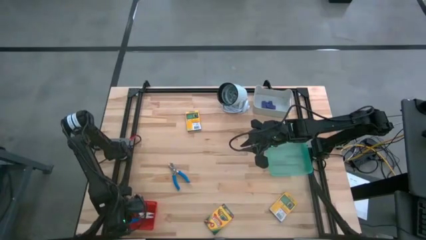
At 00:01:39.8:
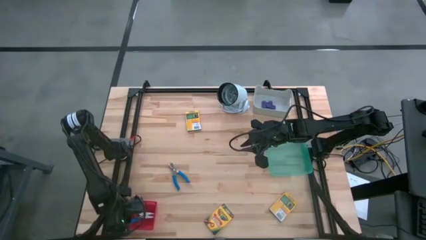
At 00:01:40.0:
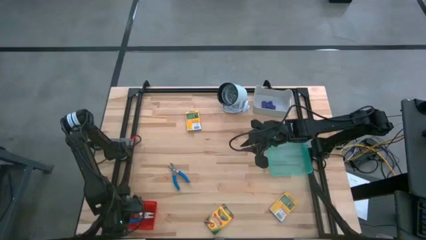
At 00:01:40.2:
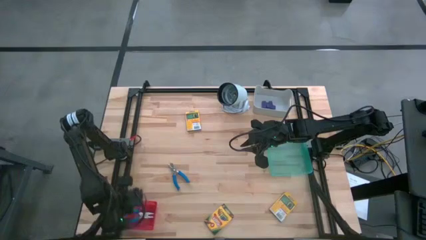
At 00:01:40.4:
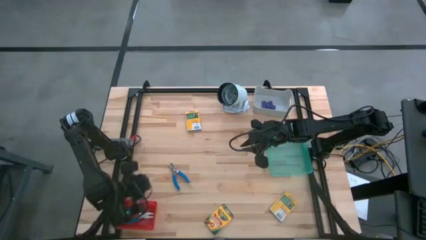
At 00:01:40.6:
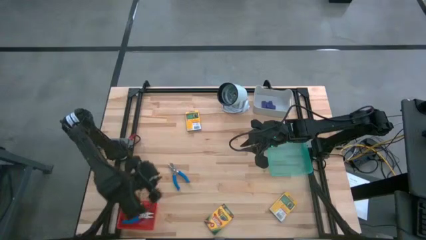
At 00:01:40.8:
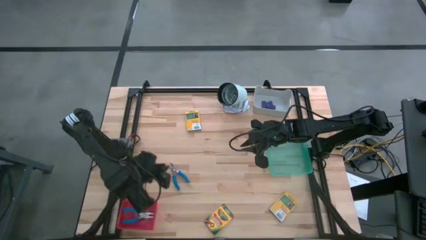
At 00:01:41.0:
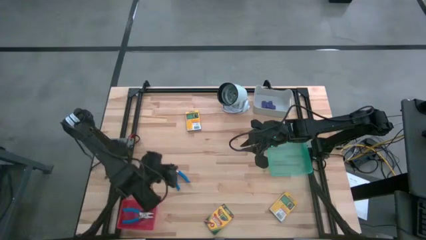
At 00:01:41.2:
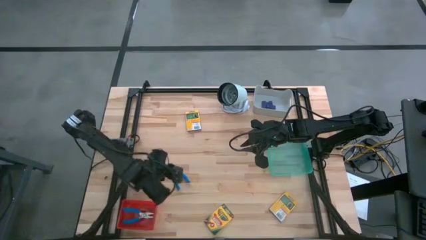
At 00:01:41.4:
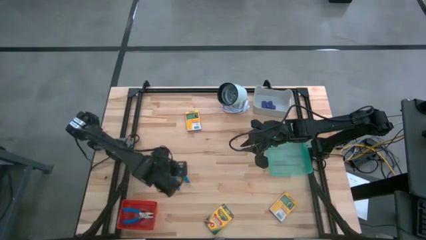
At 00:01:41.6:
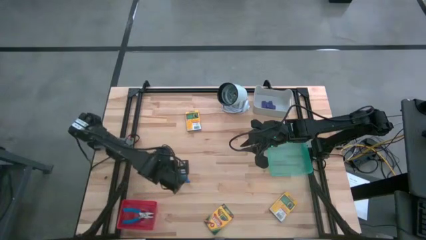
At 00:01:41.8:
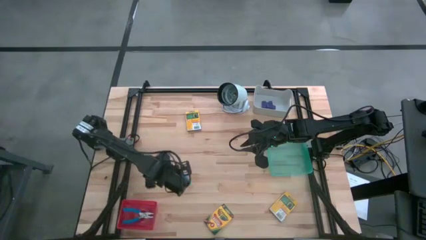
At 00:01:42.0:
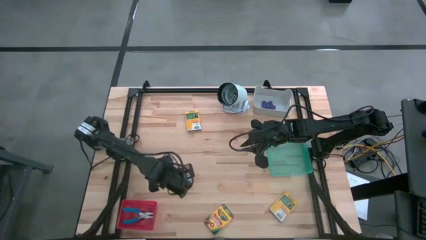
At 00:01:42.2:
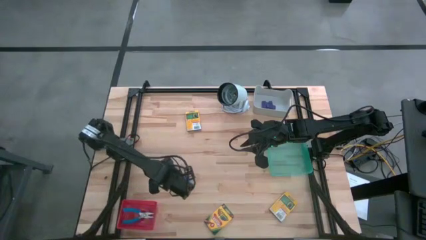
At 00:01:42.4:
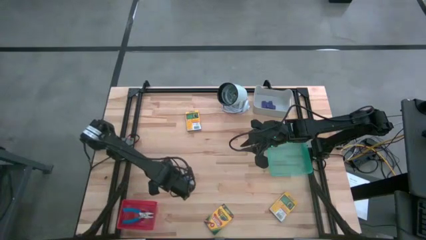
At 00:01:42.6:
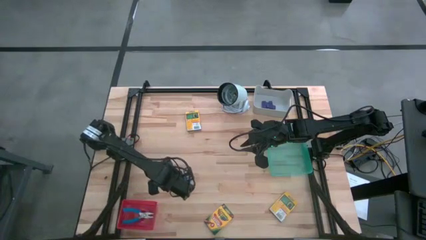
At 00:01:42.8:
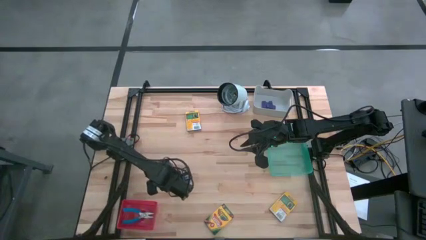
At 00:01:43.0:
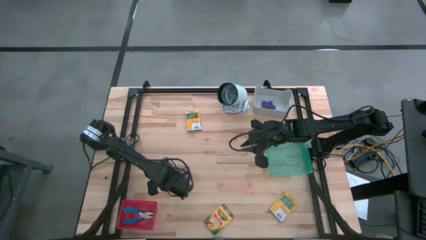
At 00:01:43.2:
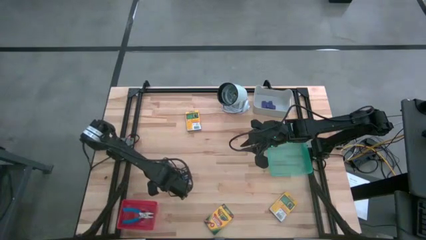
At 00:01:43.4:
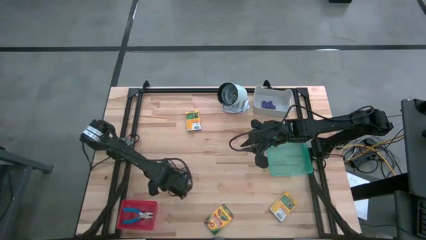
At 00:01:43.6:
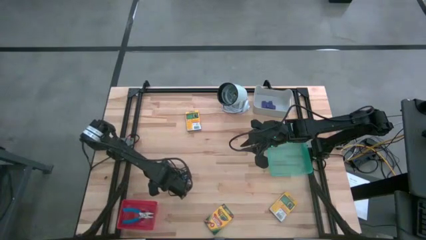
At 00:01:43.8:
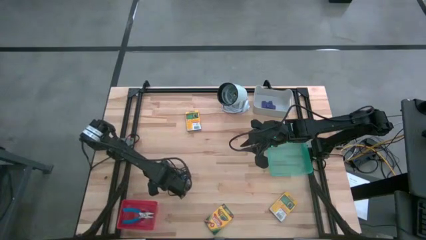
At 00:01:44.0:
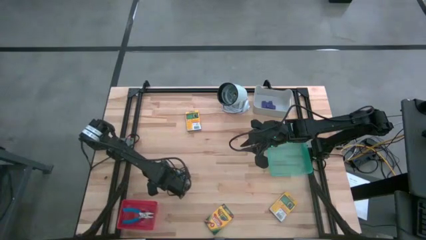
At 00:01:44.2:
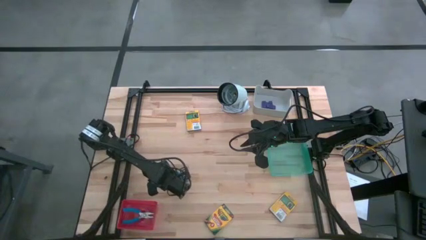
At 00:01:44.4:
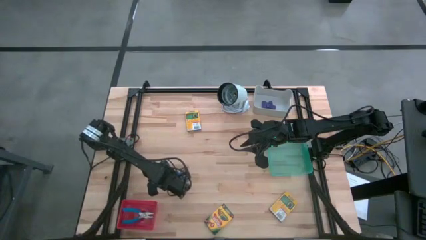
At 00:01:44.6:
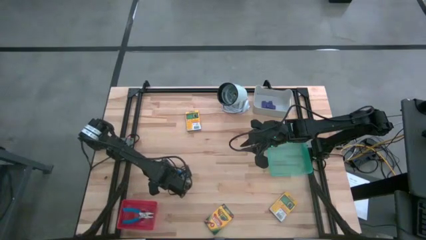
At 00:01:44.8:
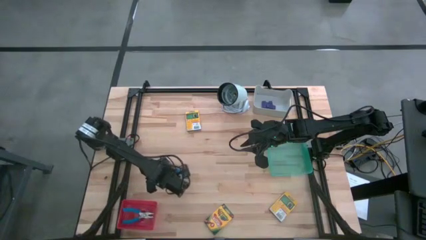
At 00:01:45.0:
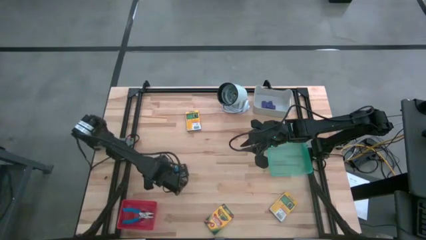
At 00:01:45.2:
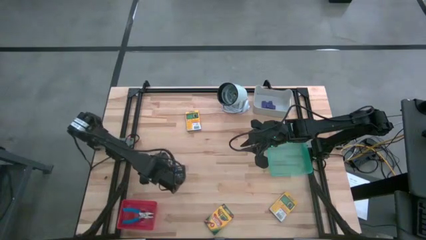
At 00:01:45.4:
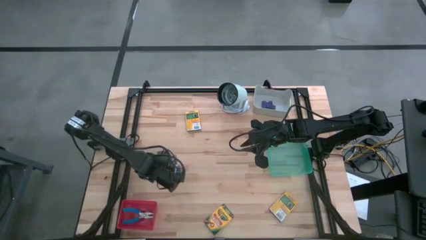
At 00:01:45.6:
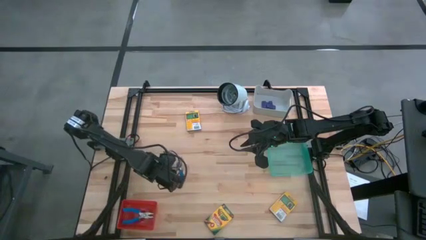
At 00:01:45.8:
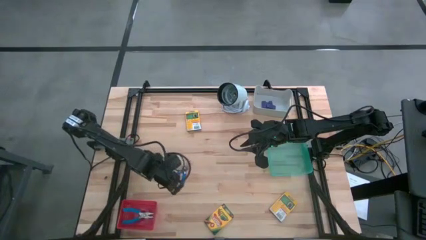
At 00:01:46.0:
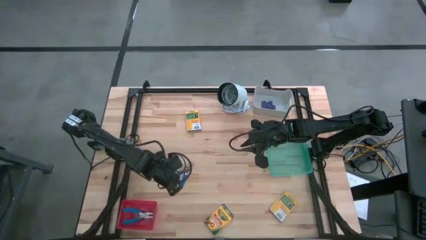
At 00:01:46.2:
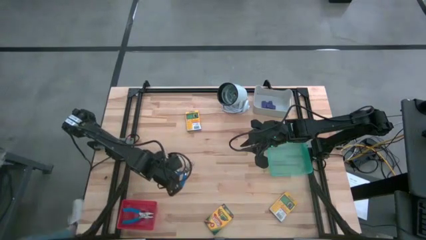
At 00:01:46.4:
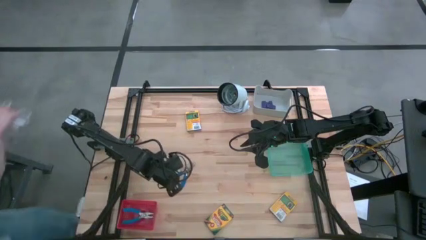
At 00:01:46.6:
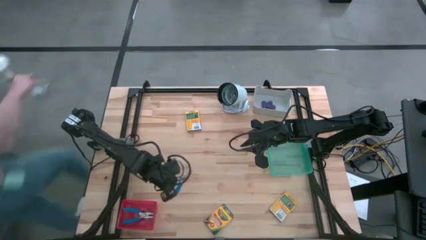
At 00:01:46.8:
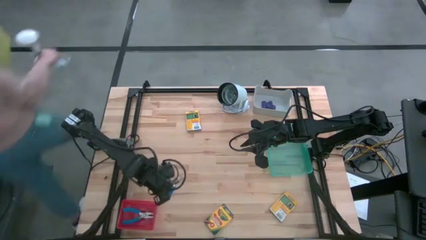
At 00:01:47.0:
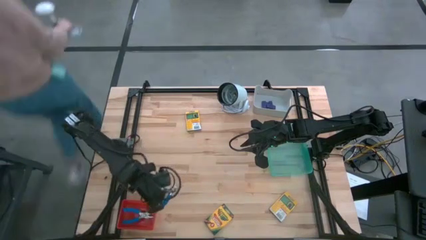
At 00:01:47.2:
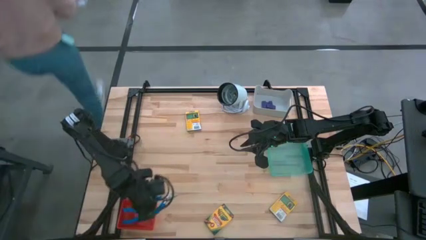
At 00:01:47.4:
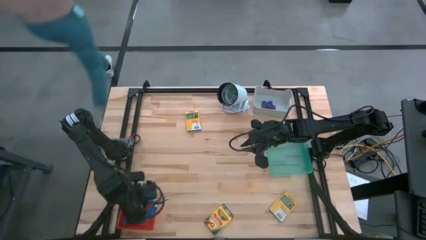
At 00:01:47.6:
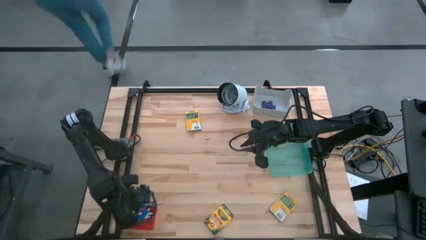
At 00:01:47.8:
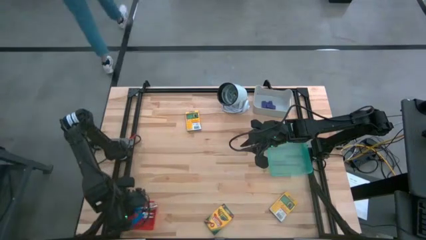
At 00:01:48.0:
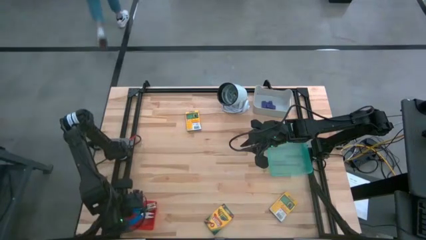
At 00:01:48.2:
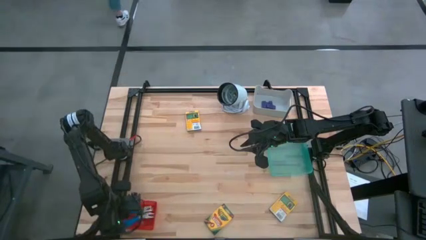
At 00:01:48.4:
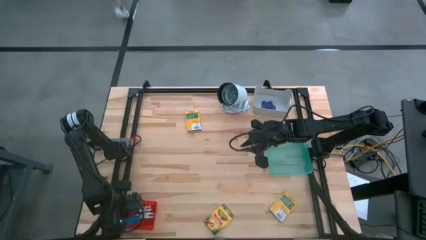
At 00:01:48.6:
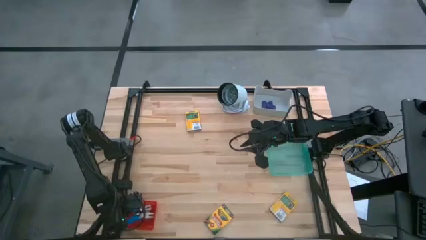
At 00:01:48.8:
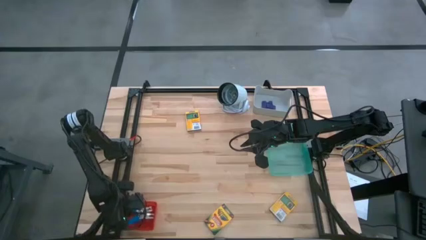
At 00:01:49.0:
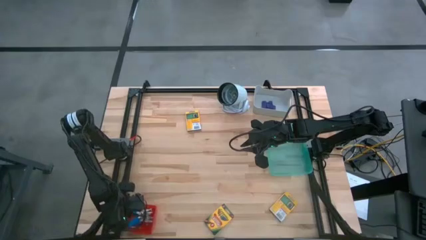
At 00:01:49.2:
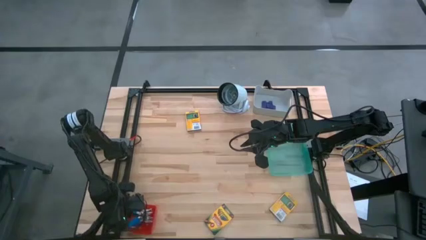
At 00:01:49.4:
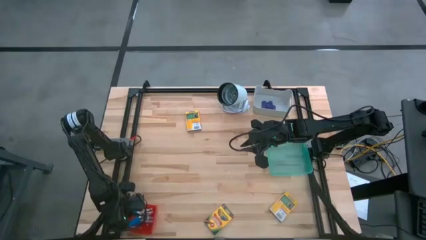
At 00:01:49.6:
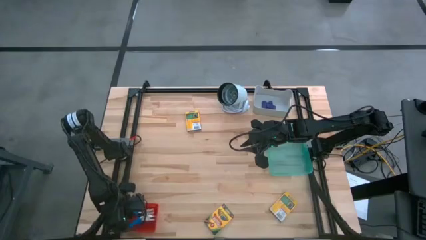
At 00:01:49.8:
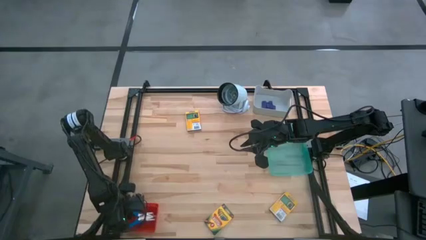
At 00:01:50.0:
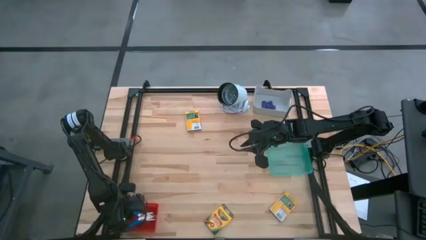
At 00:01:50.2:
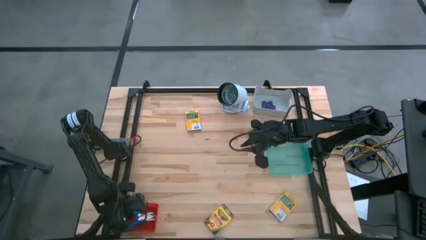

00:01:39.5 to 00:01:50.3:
Task: Pick & Place School Supplies
Put the blue puncher into the red bin

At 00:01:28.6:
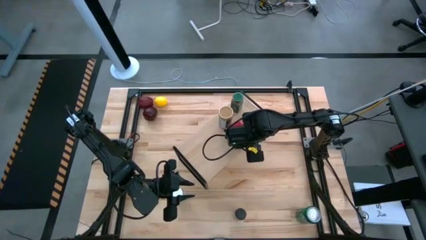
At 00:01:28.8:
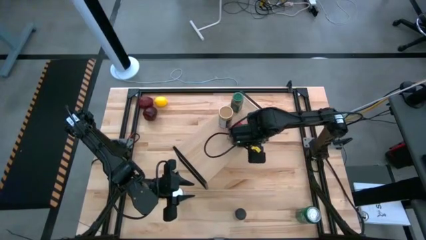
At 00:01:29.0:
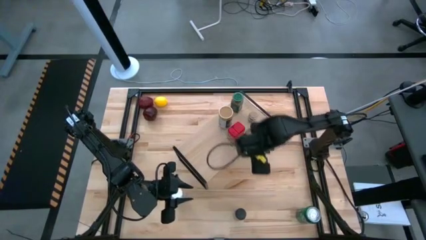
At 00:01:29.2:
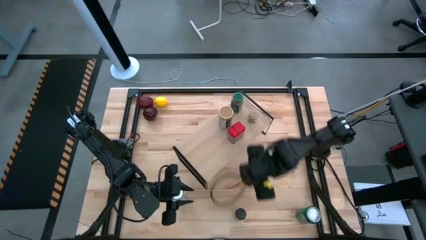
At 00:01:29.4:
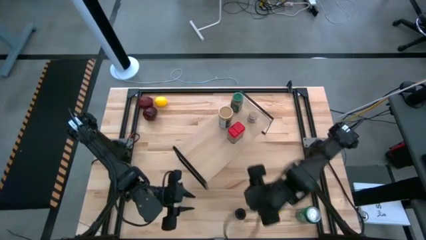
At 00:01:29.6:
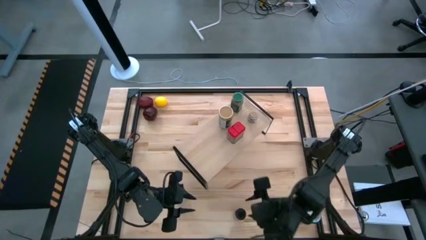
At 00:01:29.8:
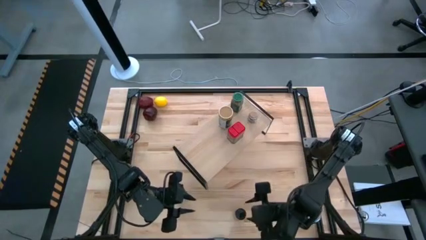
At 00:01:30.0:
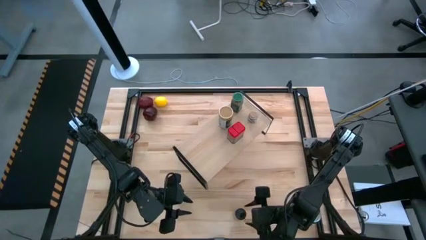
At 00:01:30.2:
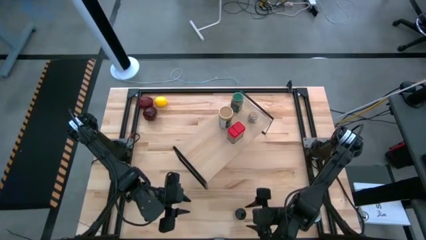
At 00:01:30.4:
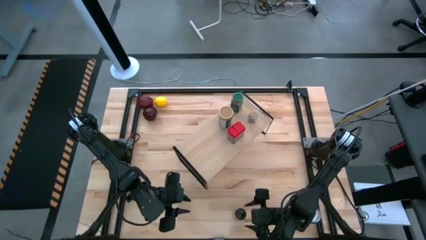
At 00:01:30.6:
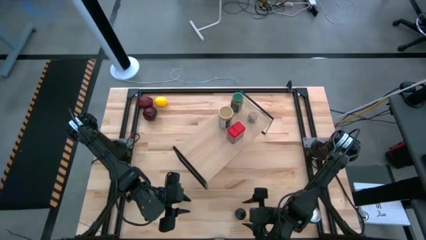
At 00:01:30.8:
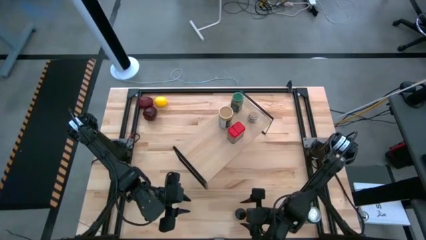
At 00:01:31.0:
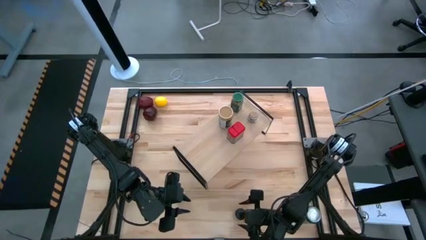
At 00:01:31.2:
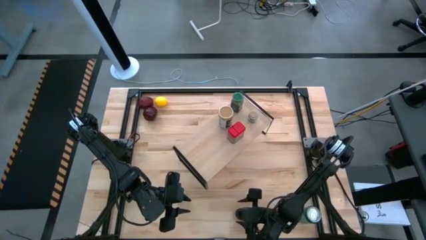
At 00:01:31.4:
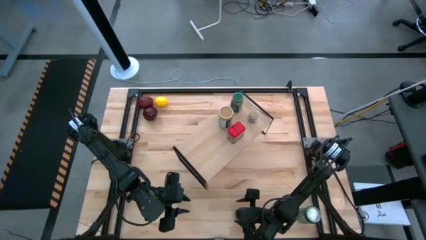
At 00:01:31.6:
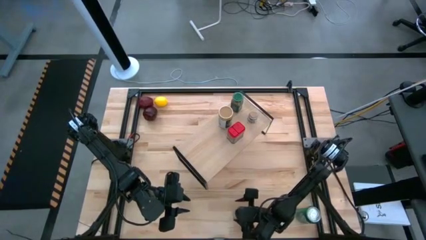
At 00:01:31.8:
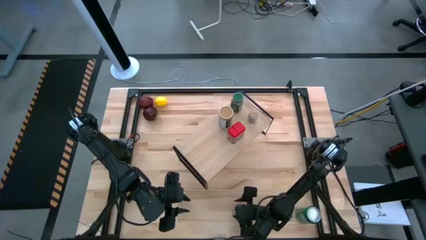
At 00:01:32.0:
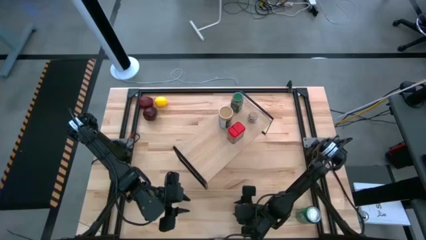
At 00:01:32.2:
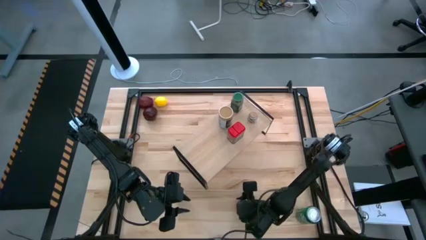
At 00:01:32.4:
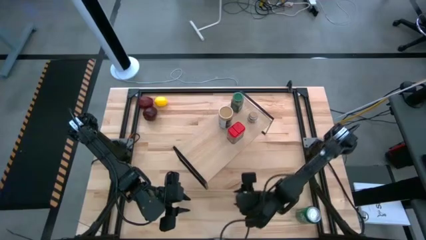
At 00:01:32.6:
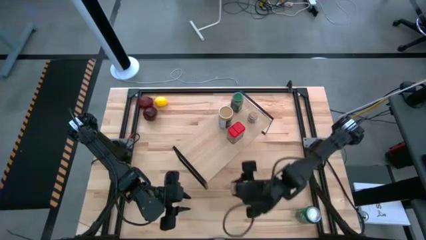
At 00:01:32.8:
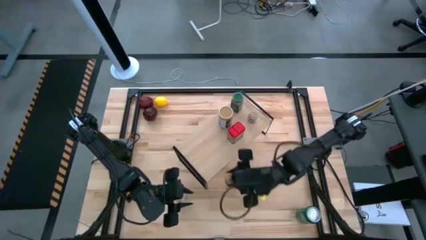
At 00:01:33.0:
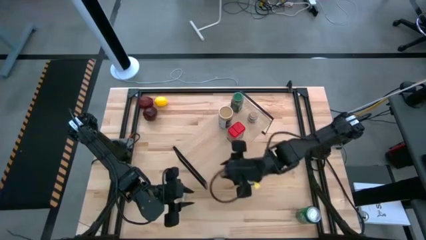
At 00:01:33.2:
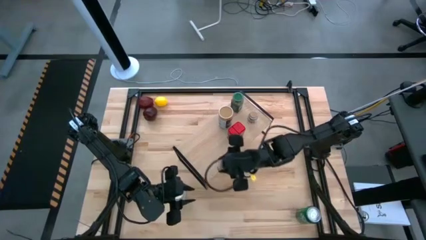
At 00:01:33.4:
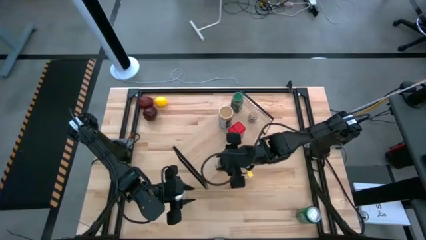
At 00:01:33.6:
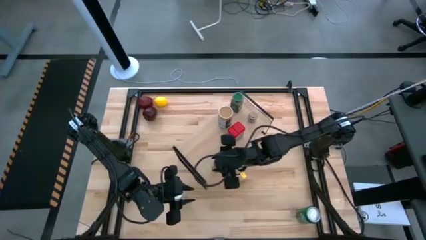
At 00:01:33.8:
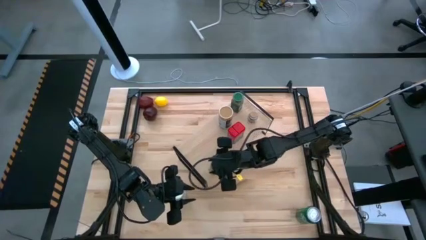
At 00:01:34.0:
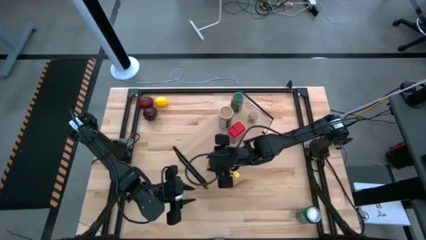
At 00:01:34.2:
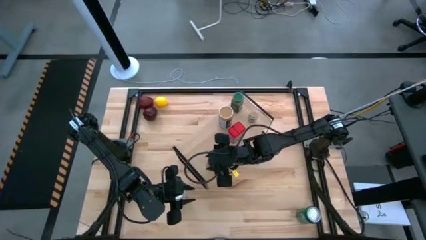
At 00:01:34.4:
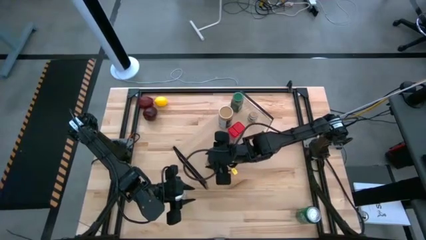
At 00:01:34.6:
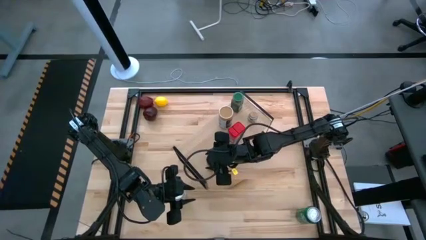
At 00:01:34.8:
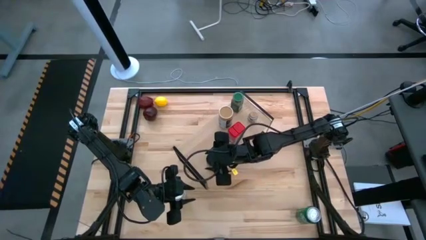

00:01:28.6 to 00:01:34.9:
Task: Shelf spices
Put the black seasoning bottle on the shelf
